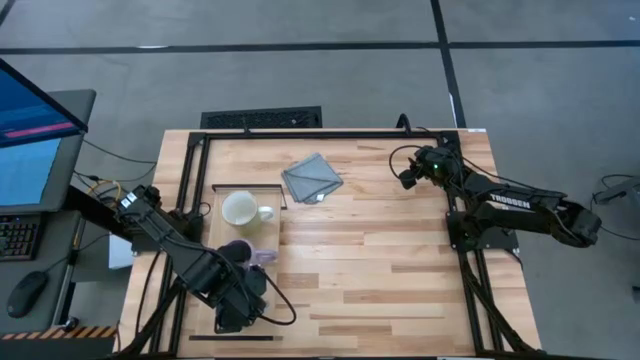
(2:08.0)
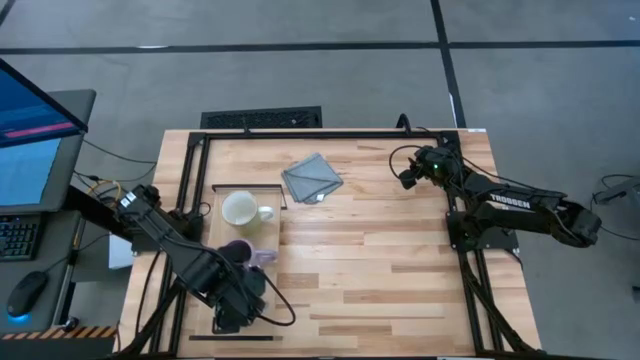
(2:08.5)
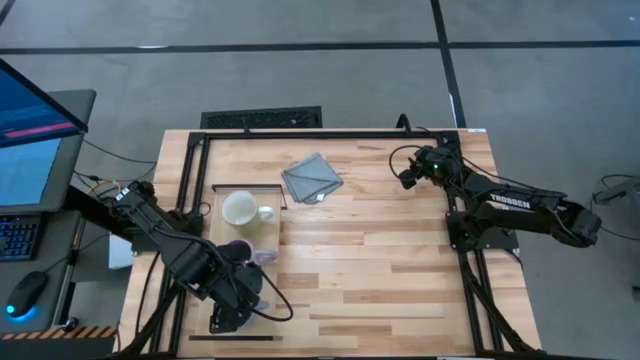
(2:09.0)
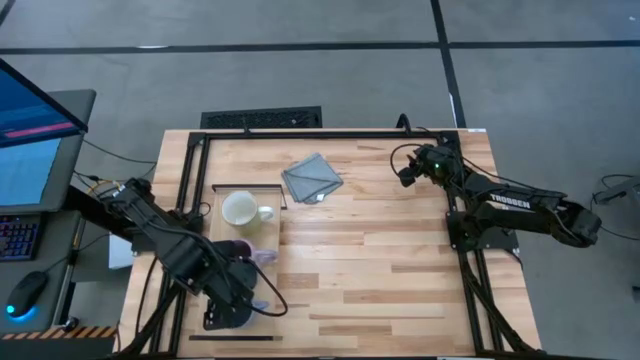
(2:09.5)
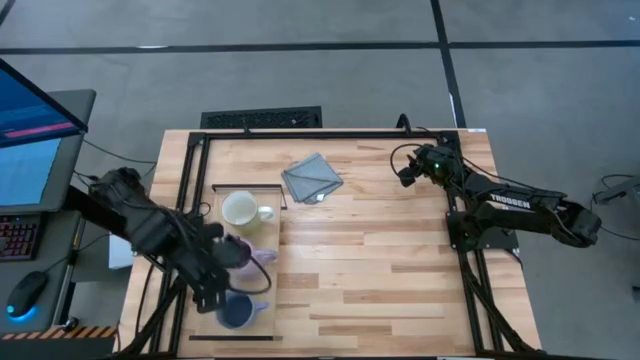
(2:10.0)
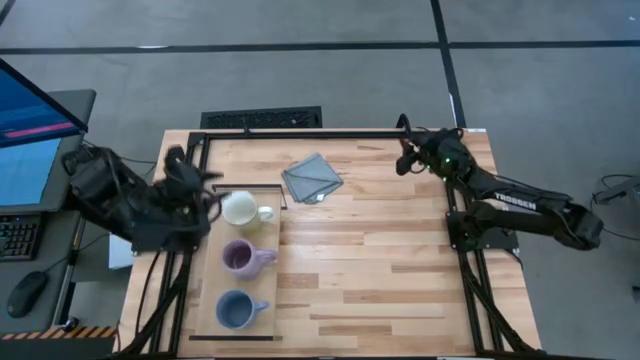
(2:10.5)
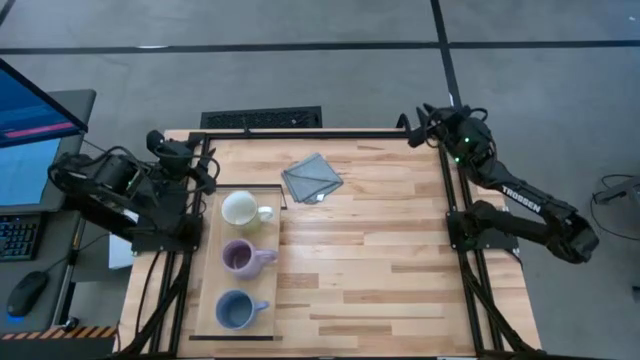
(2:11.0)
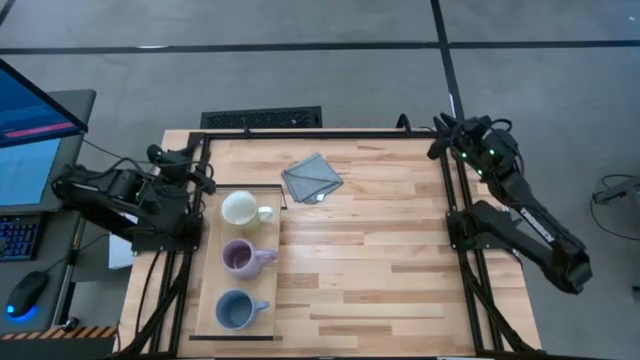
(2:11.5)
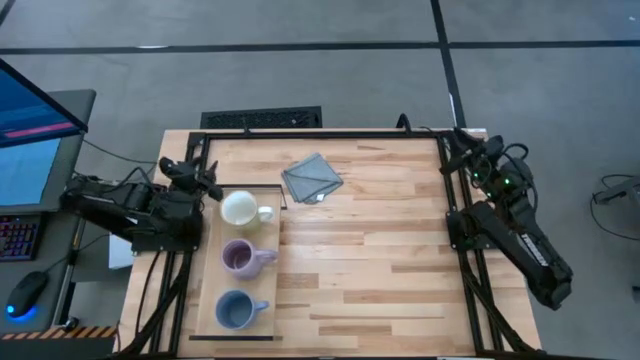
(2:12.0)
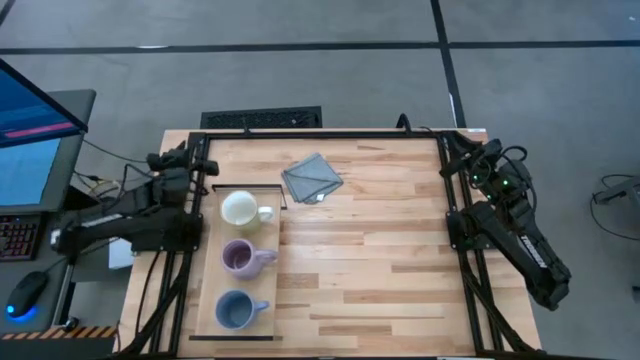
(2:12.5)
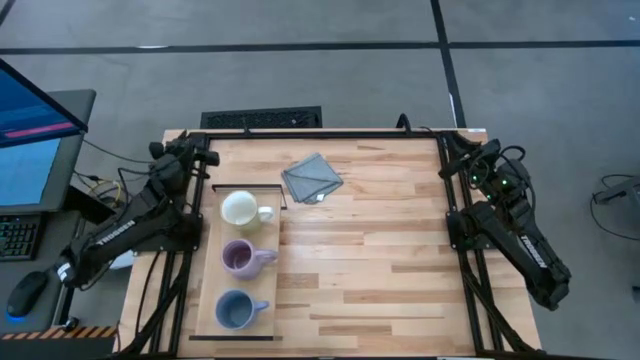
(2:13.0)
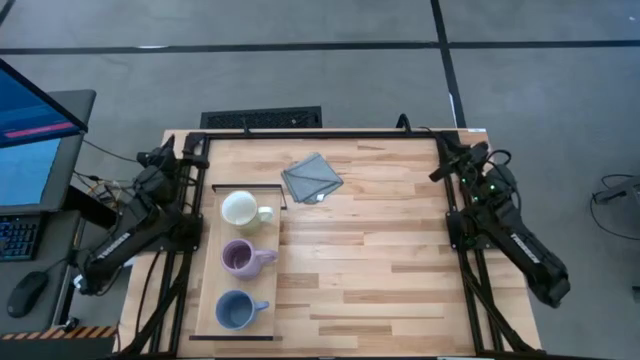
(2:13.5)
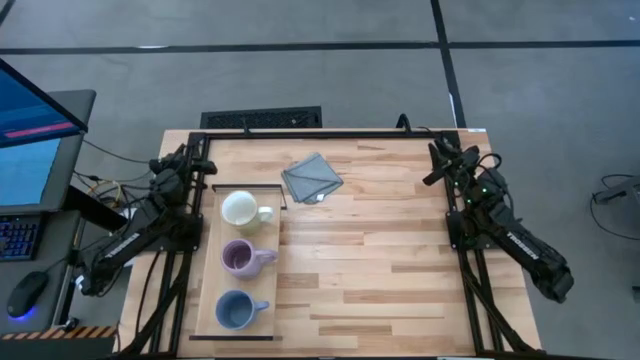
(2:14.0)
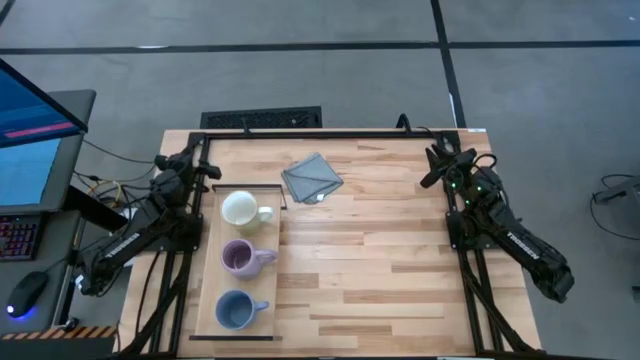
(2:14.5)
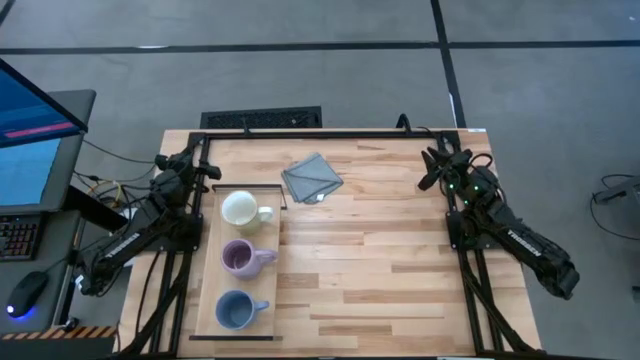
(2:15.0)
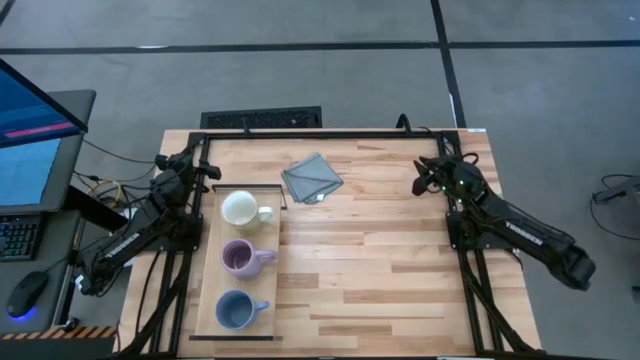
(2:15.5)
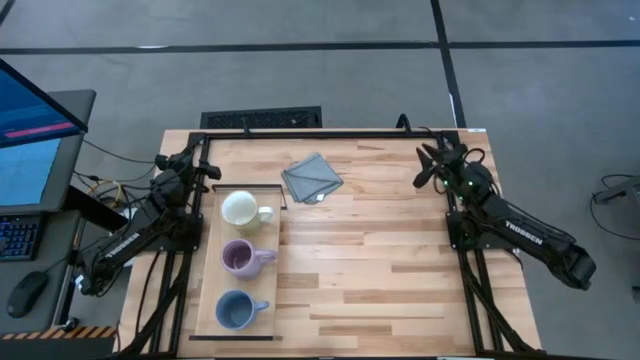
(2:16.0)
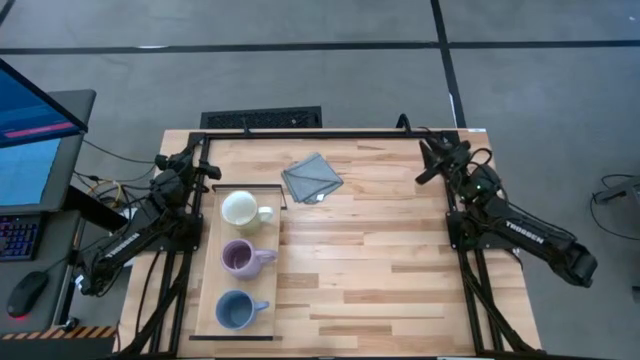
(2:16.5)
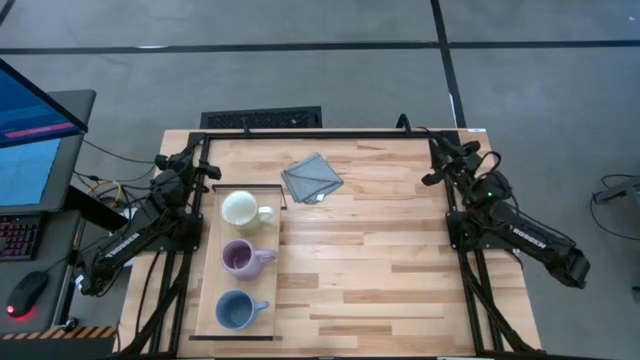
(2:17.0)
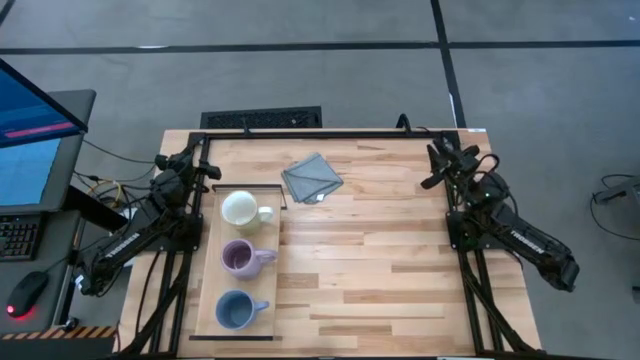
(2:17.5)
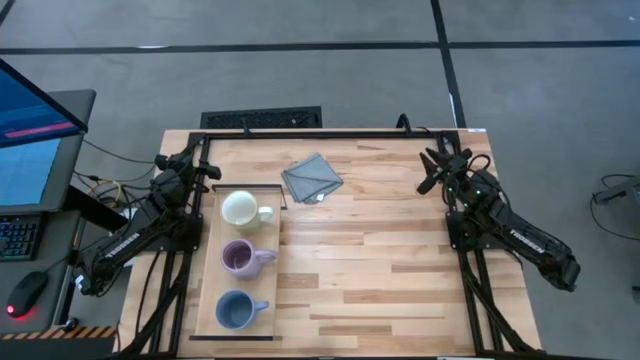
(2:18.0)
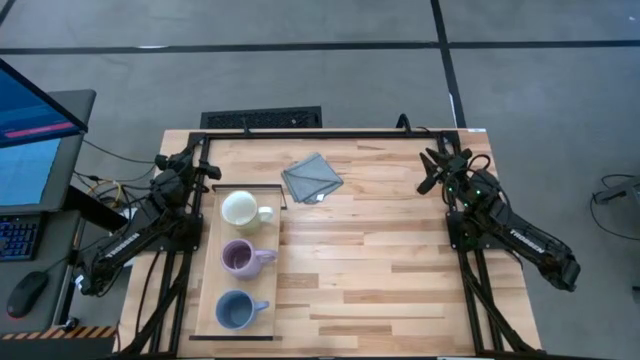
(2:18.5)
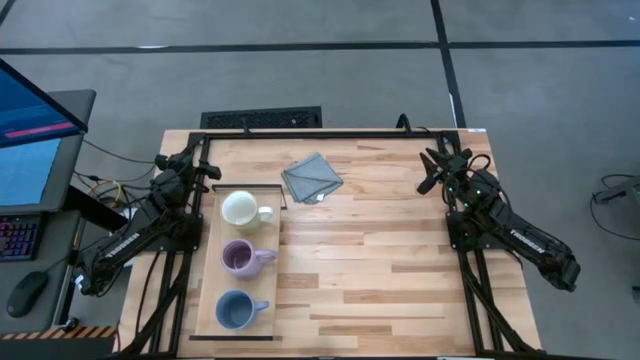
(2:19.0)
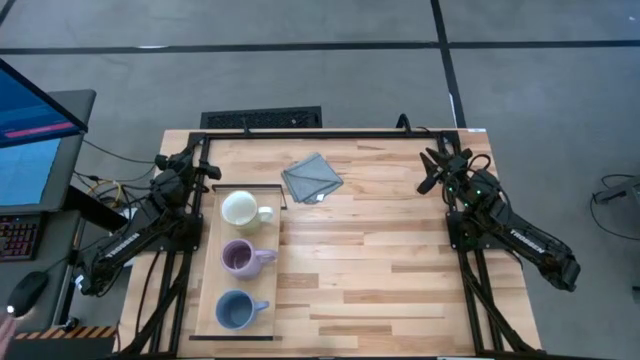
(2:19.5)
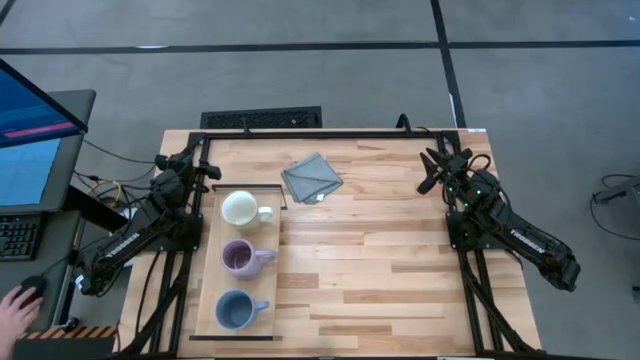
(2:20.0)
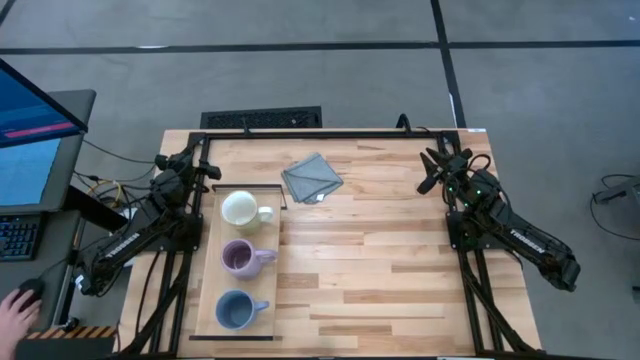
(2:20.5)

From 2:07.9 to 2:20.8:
Task: Stack small to large cups/mugs on shelf
Return to Home Position

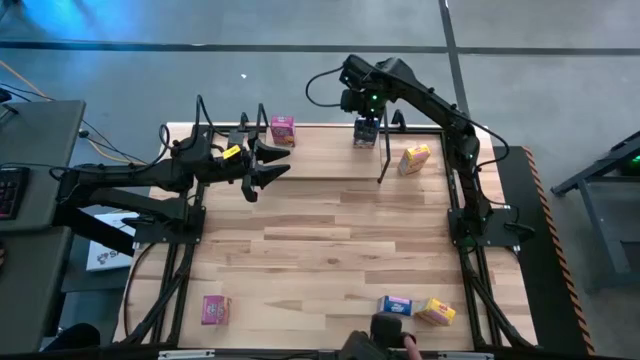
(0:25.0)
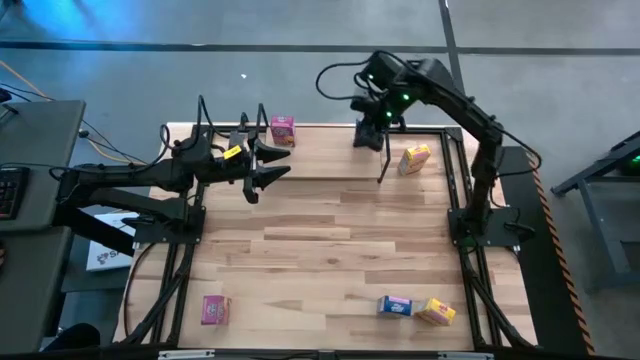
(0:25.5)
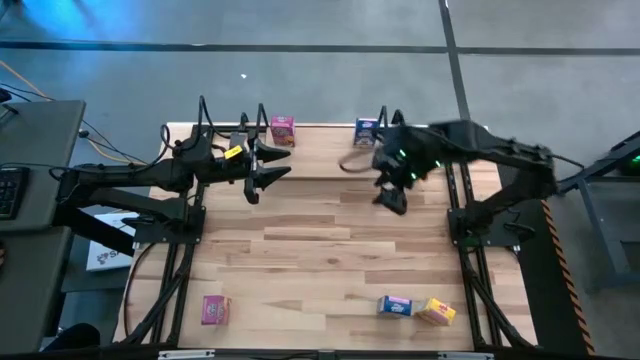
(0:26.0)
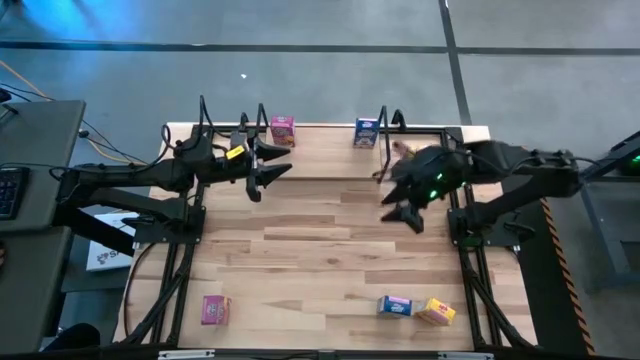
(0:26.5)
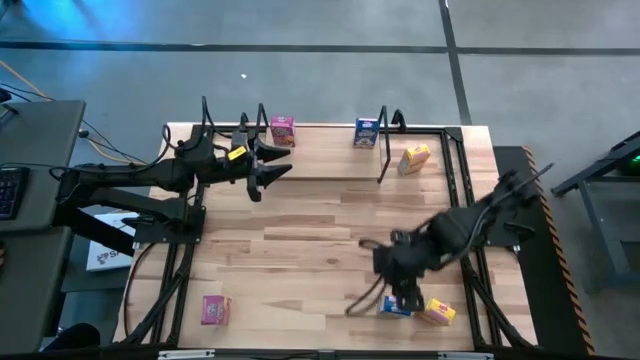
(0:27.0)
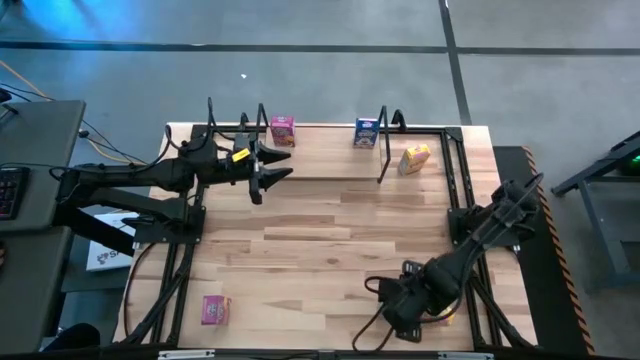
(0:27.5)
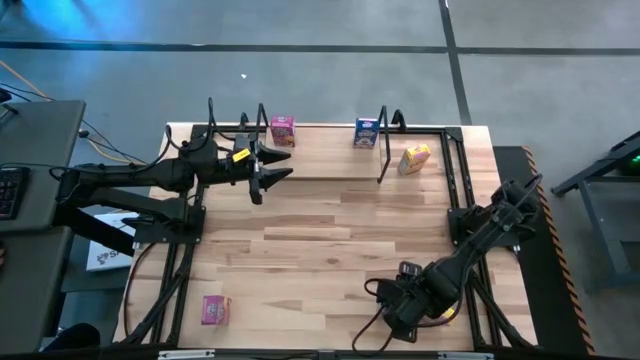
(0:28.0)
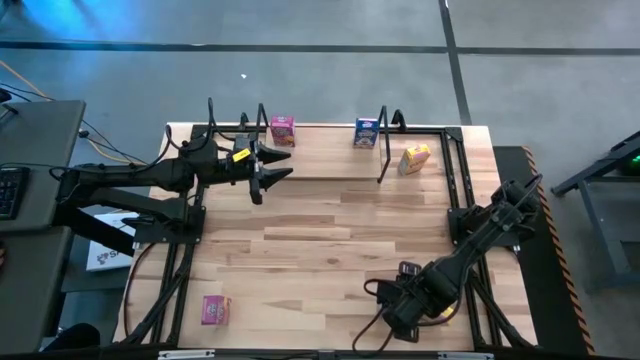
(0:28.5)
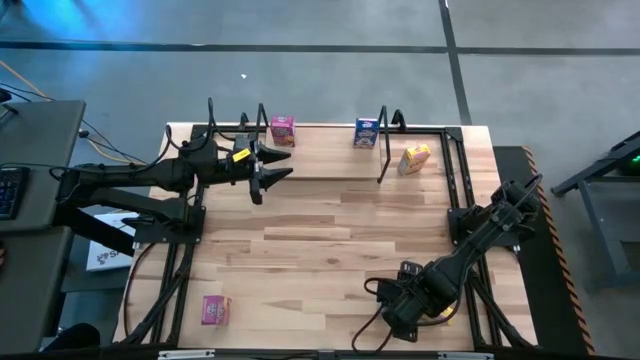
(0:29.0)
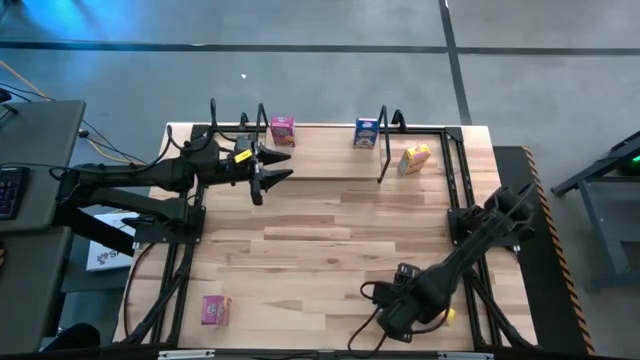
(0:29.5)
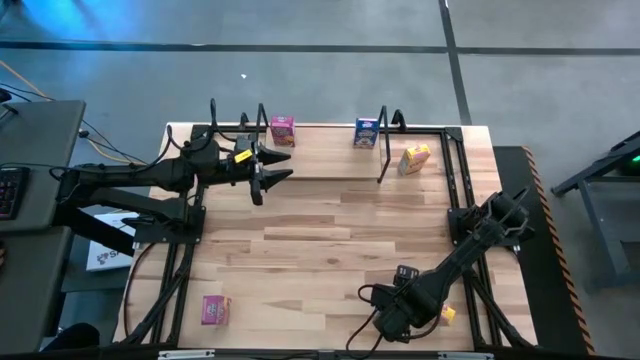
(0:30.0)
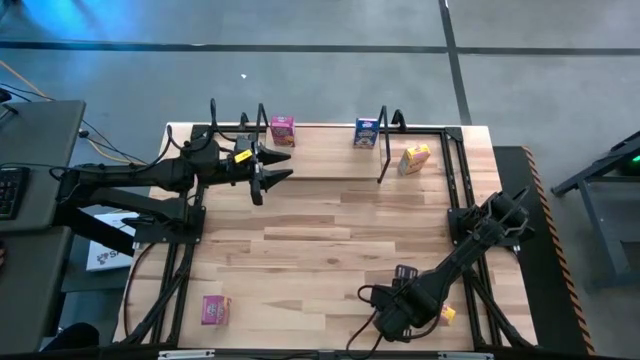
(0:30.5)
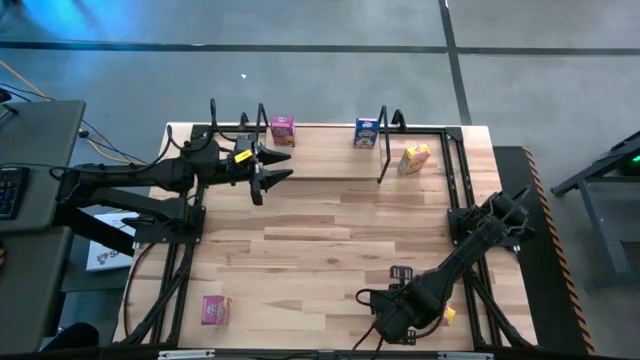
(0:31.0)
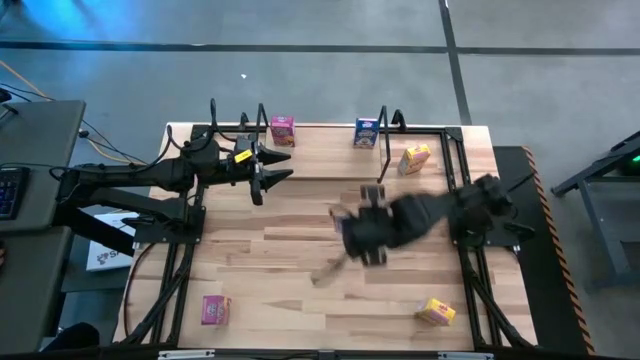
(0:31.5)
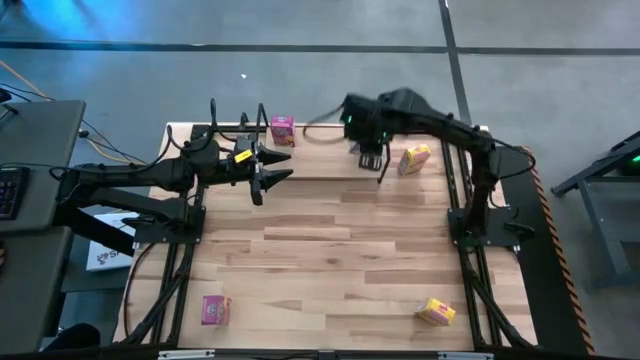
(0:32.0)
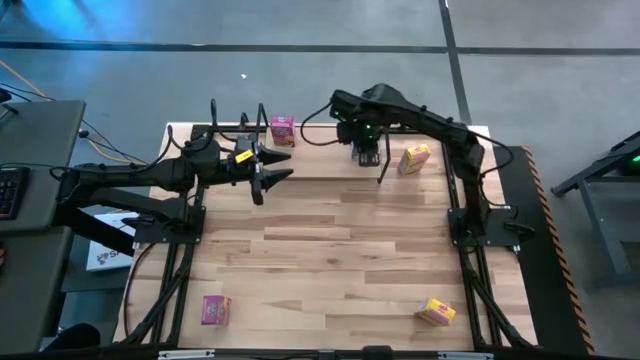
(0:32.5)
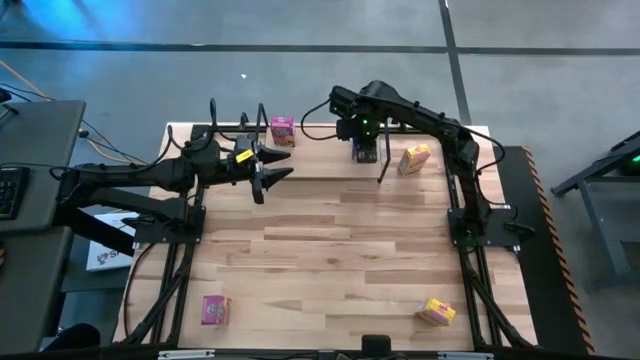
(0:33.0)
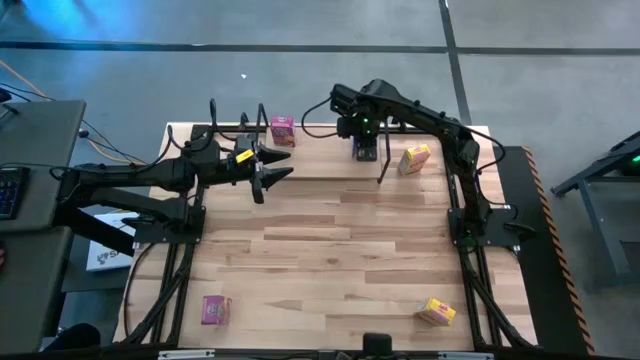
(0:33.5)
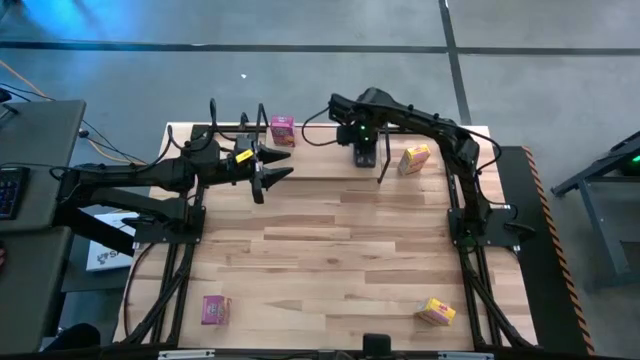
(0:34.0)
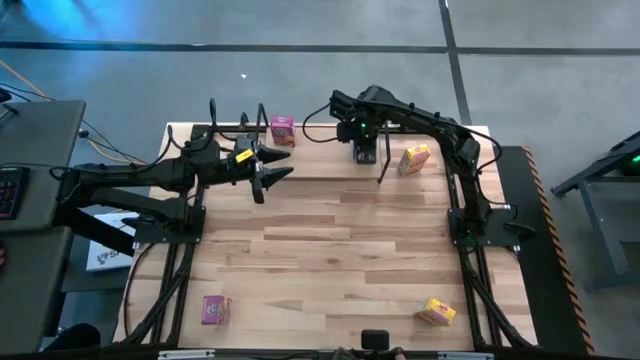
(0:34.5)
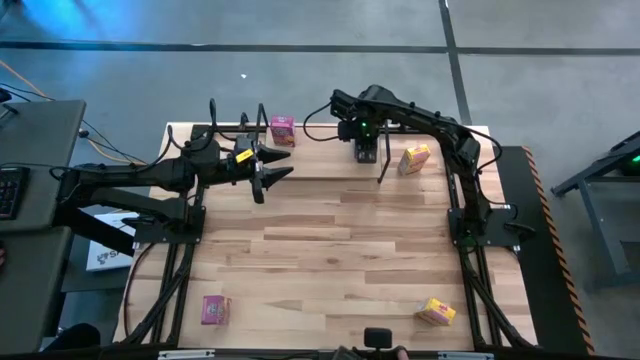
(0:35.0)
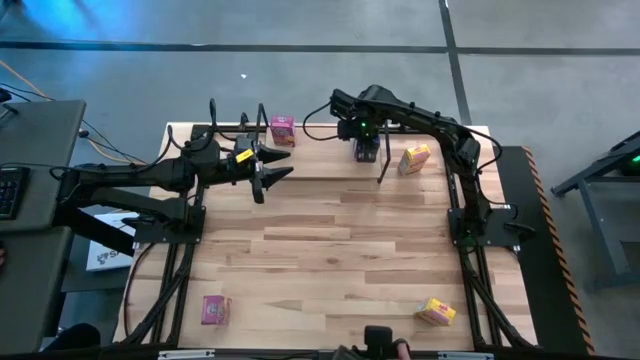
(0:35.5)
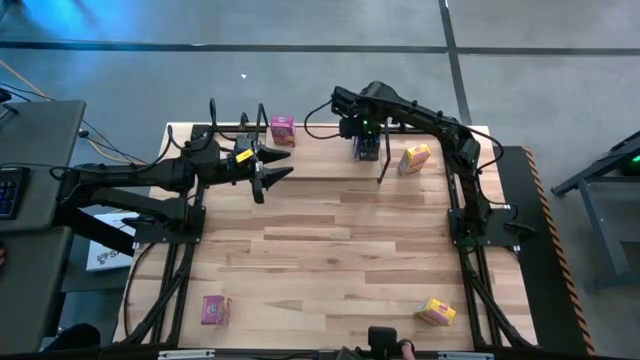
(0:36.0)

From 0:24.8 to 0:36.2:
Task: Stack cereal on shelf
Put the blue cereal box aligned with the other blue cereal box on the shelf
